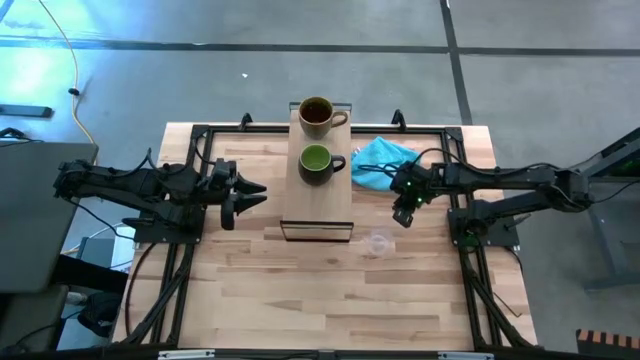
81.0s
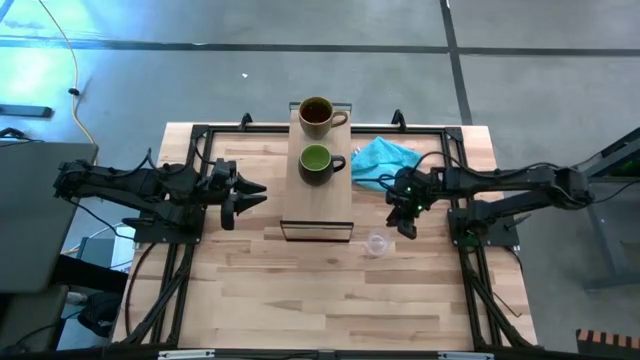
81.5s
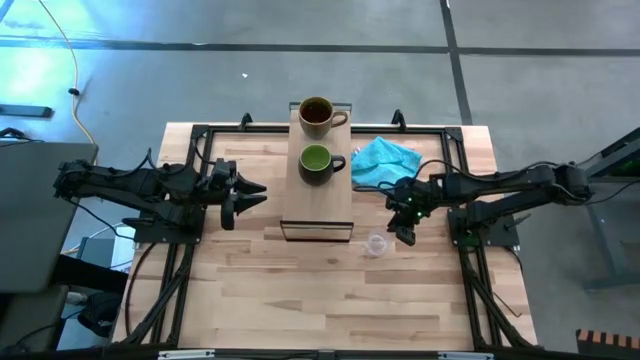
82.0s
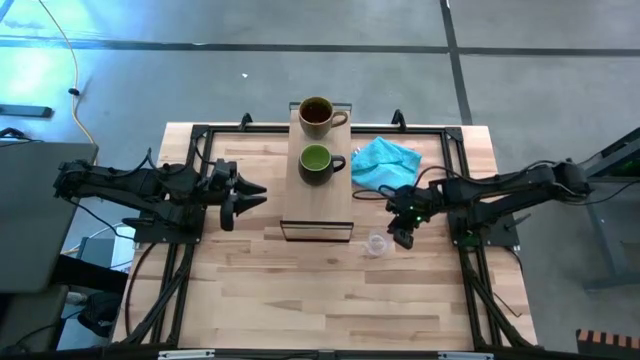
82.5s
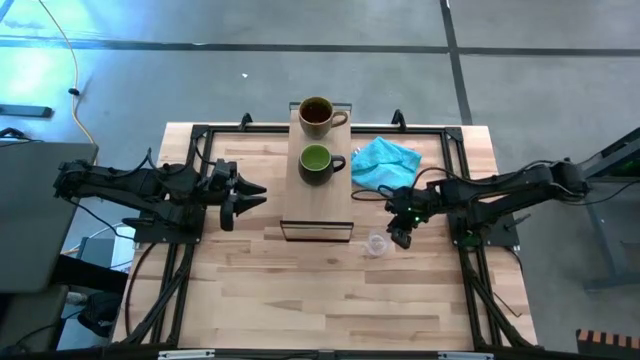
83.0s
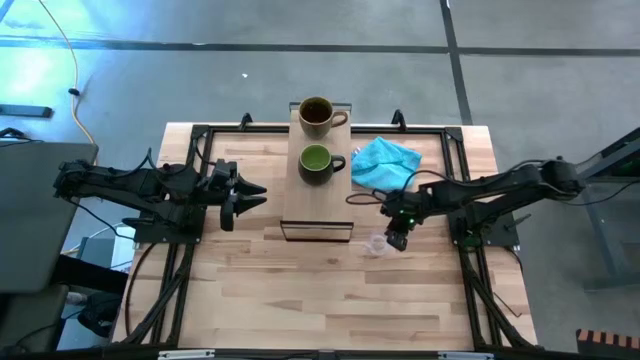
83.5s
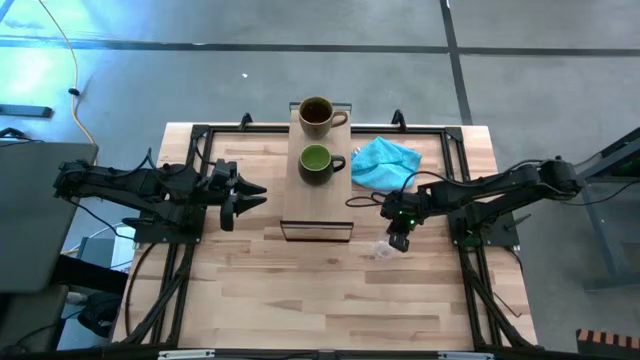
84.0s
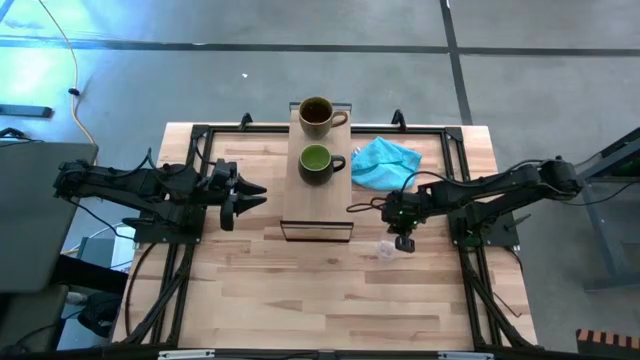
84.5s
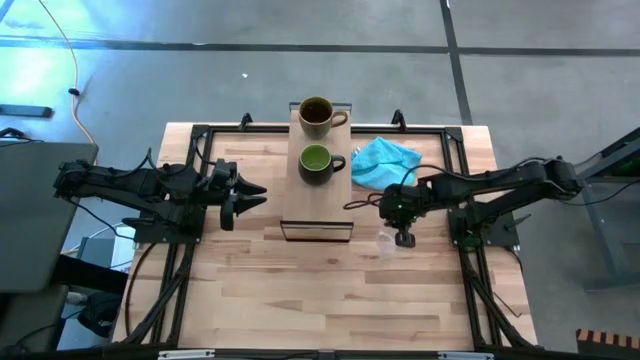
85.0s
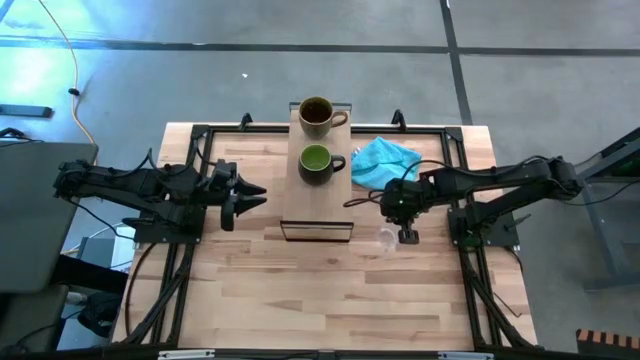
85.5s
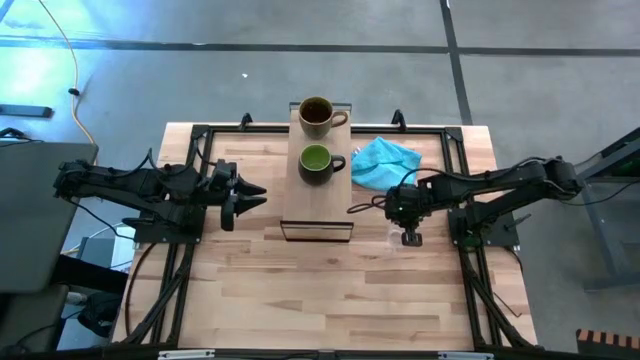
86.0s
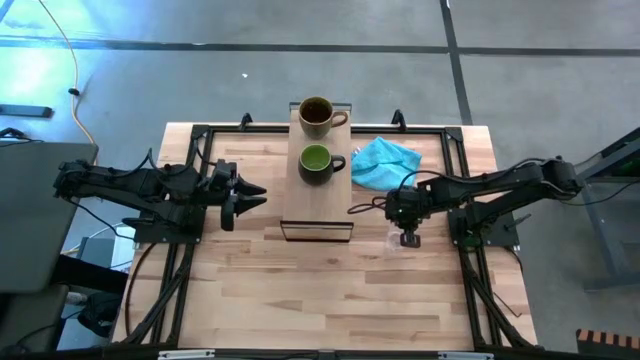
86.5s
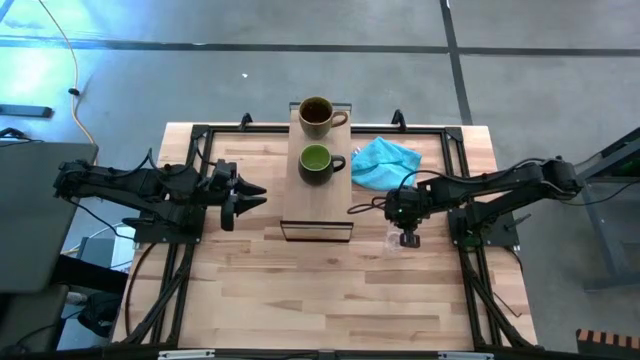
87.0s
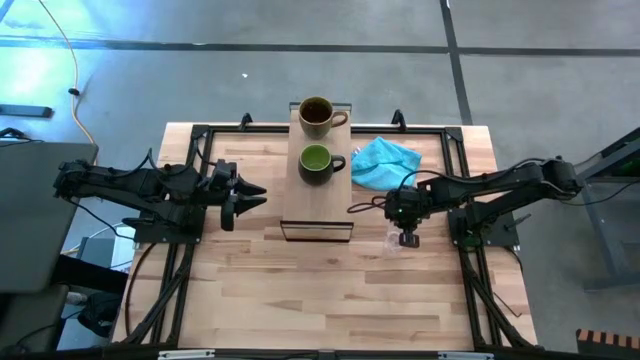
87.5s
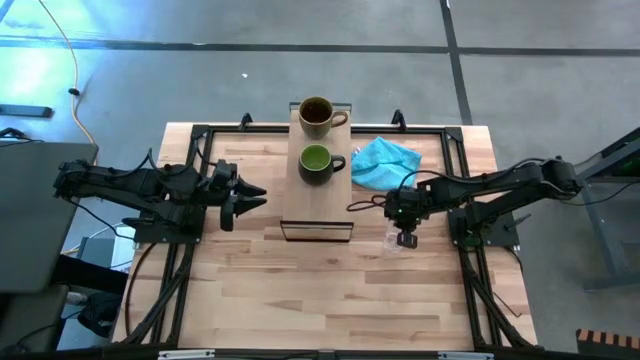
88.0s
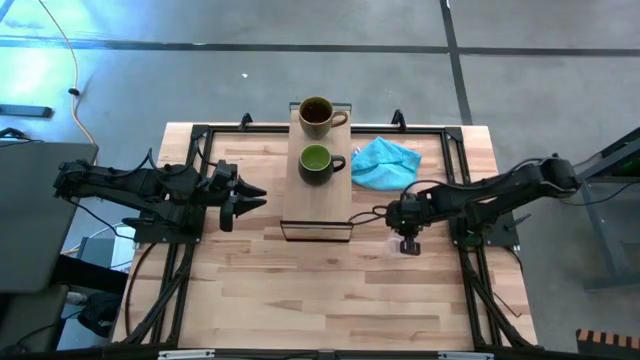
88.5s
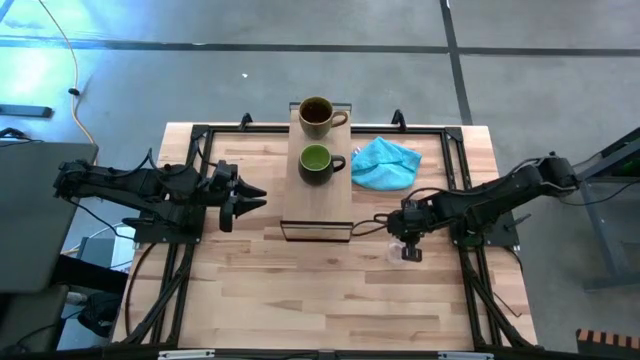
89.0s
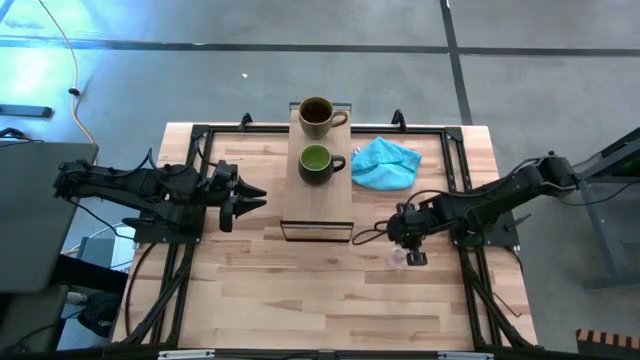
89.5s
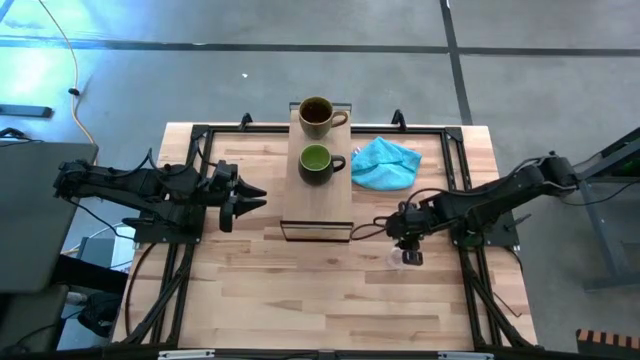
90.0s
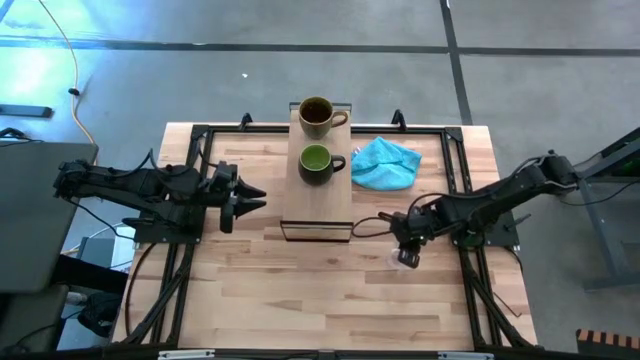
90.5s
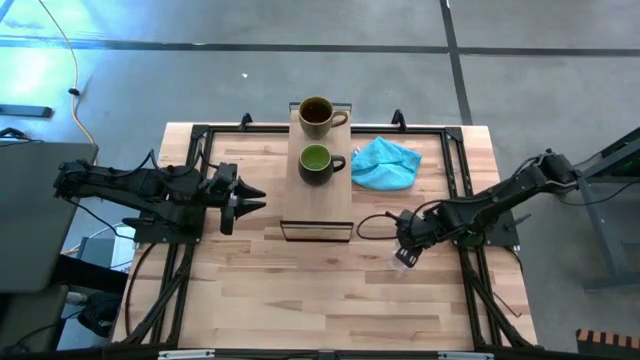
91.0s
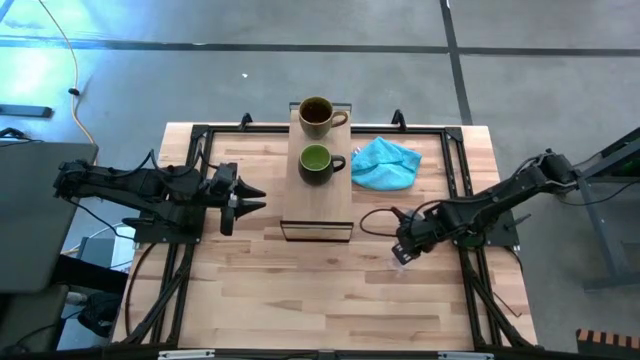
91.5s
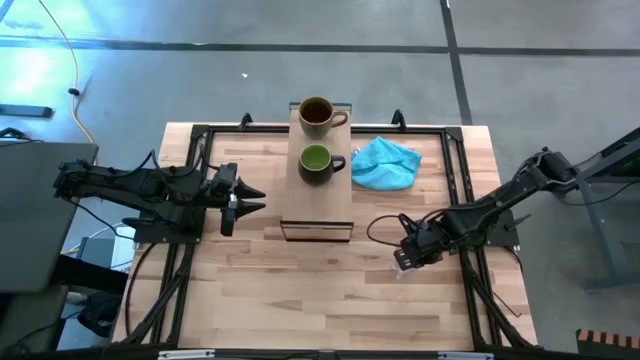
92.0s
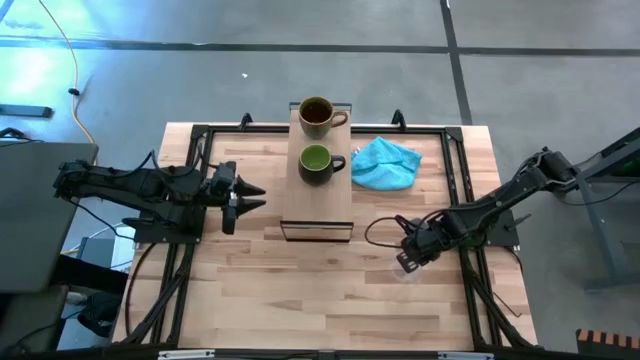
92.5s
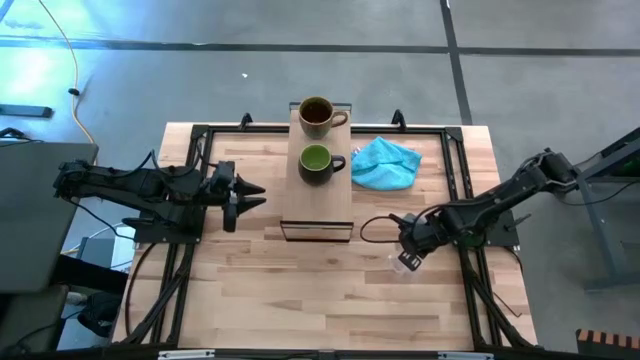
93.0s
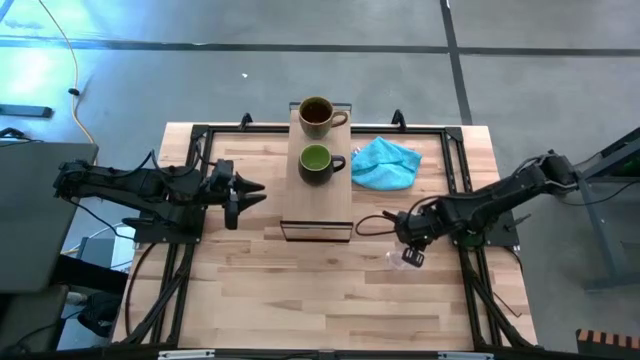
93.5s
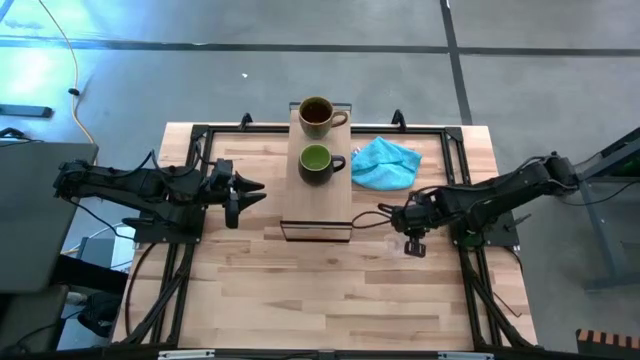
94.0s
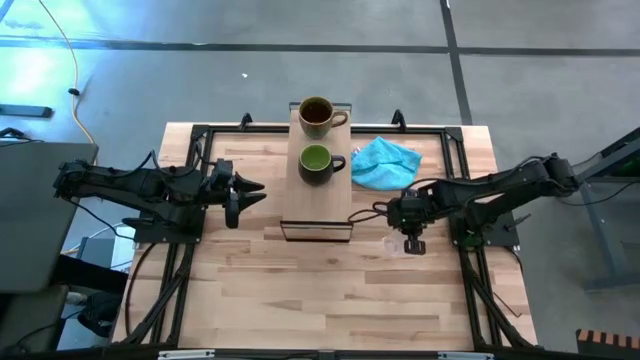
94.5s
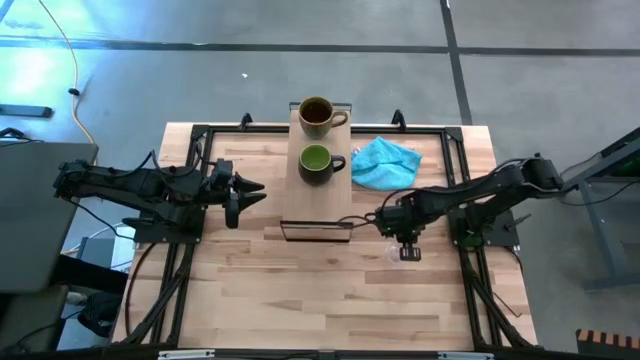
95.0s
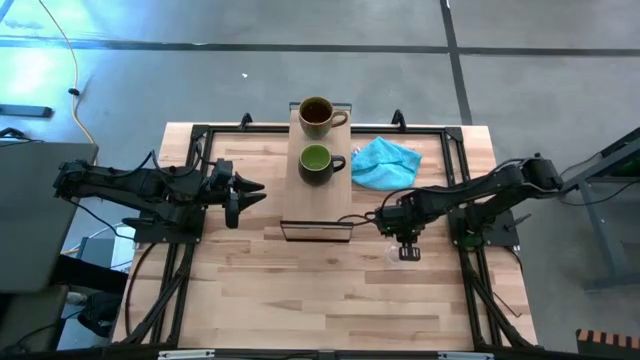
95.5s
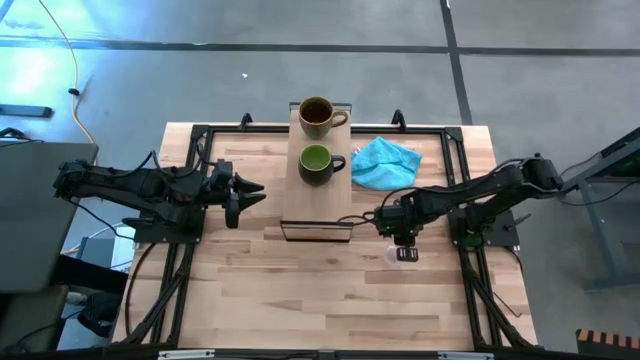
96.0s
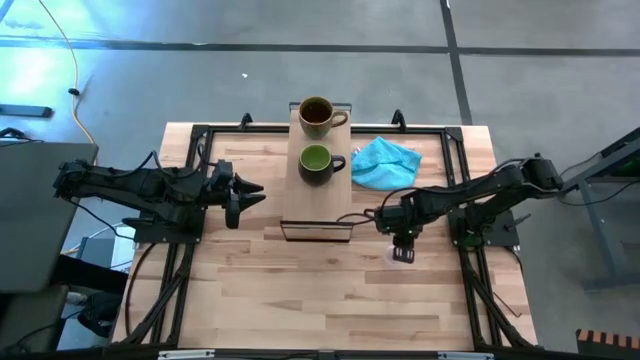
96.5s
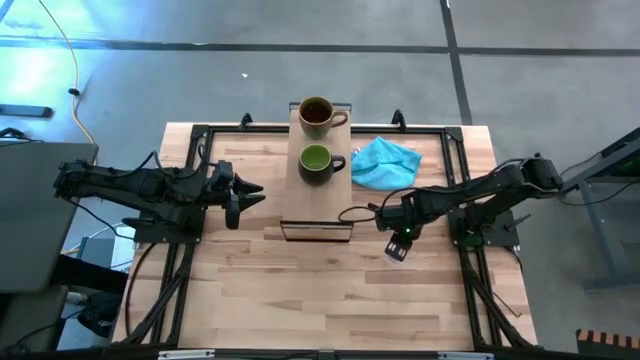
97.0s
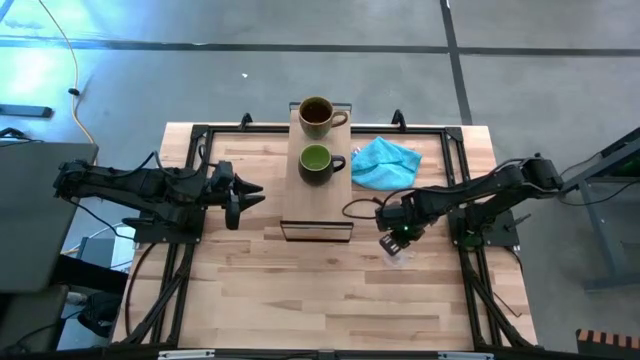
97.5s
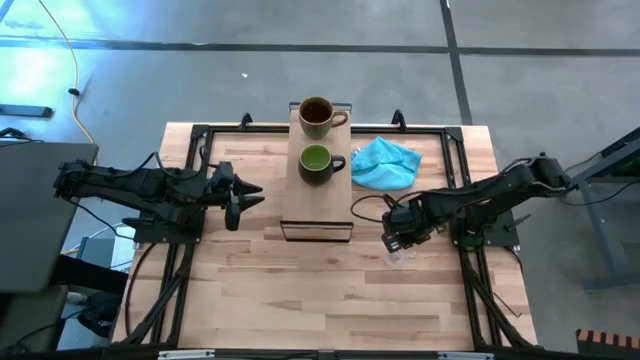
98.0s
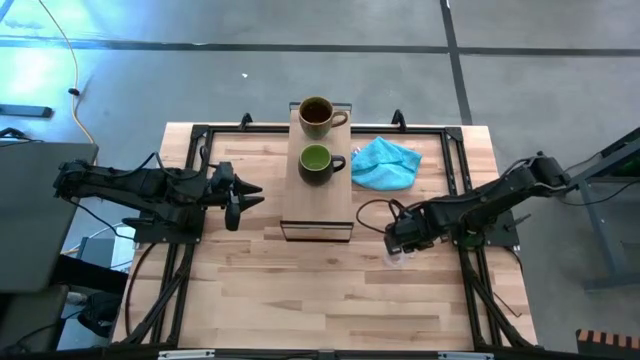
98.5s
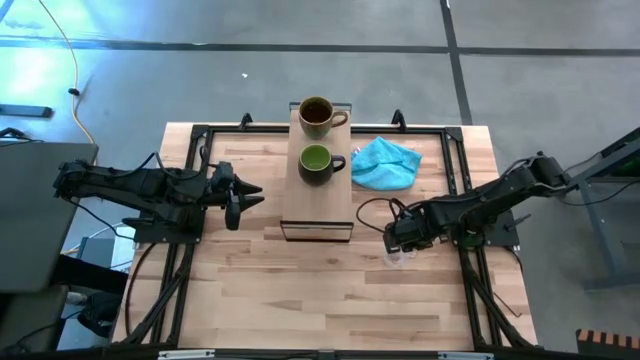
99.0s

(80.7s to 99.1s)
Task: Stack small to large cups/mugs on shelf
Put the transparent mug on the shelf

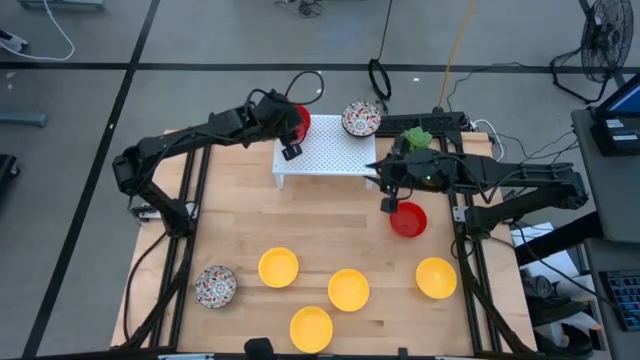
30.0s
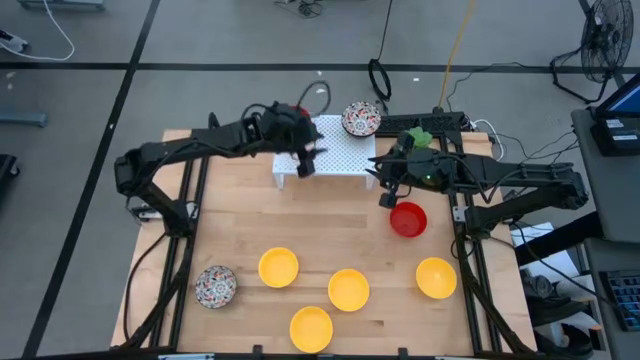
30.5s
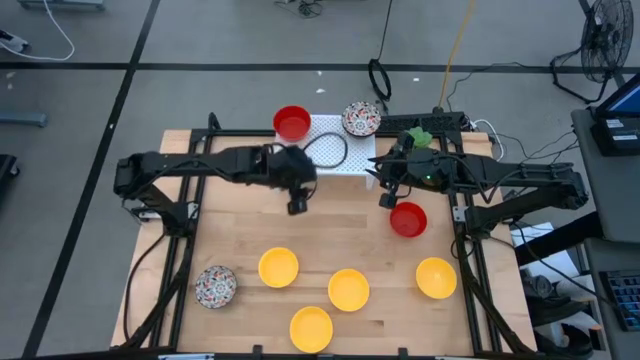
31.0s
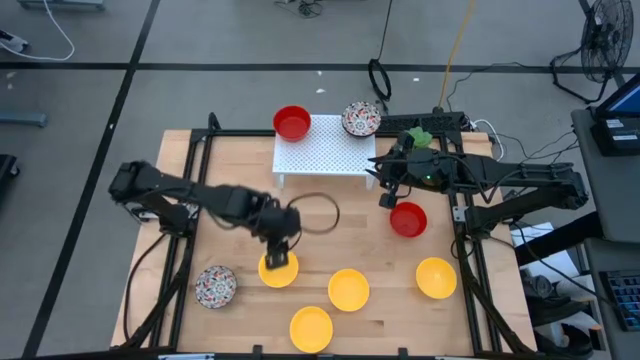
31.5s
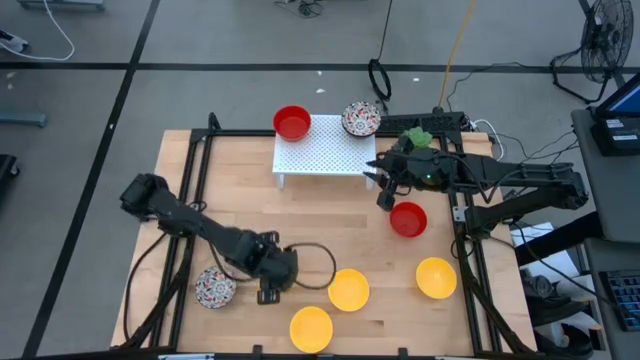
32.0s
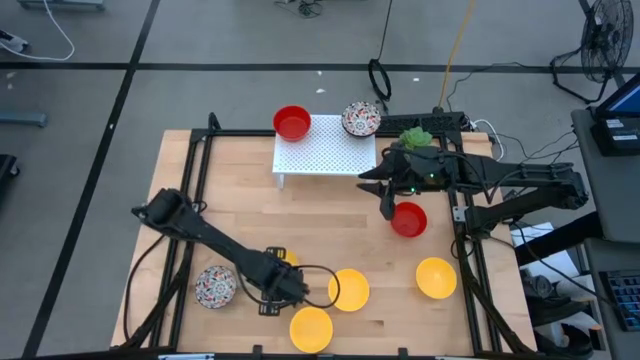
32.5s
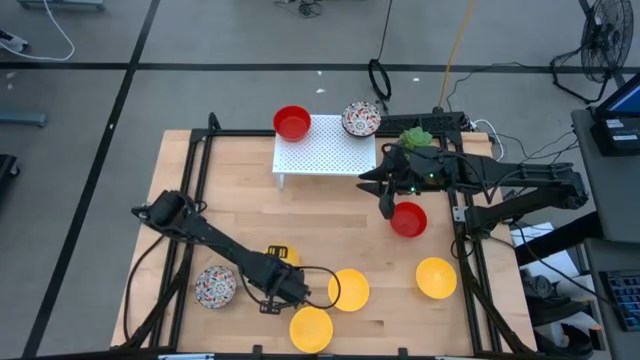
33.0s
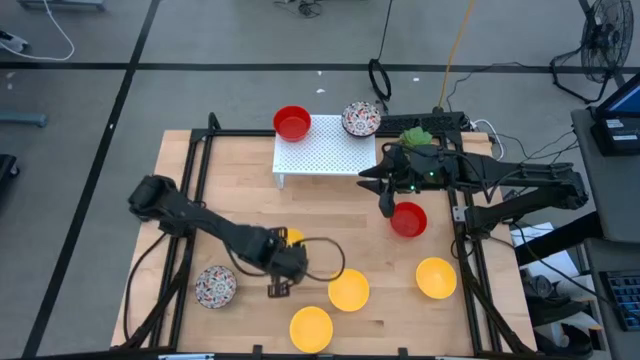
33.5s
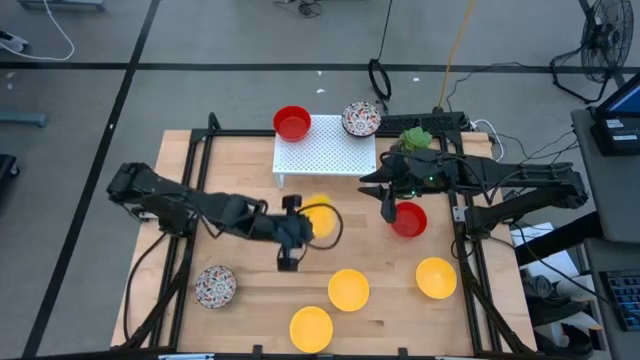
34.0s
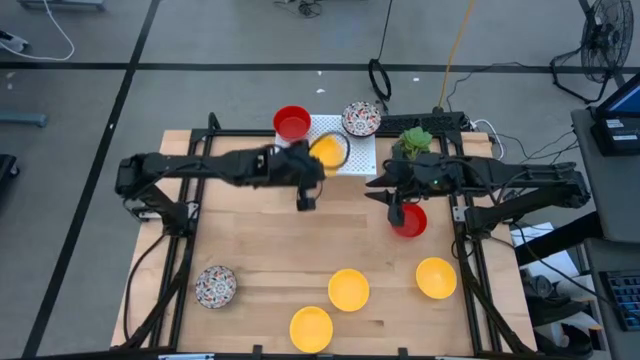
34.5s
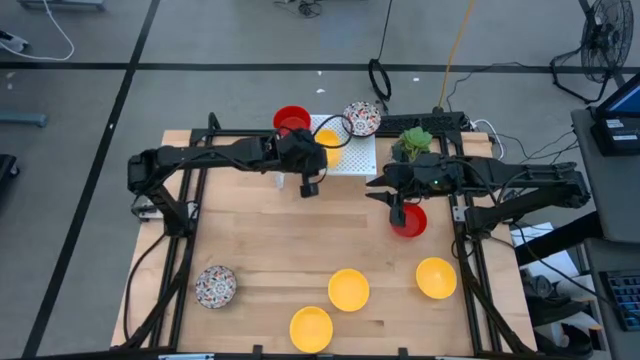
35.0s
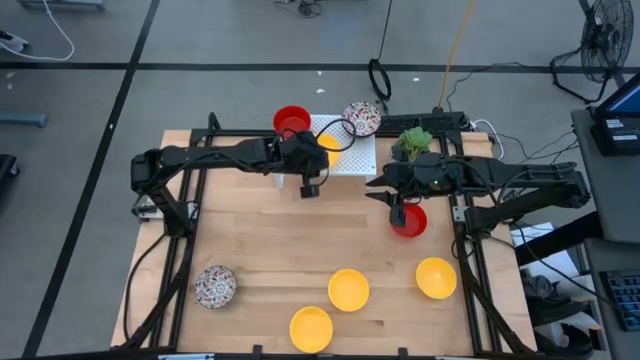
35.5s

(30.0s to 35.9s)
Task: Pick & Place Mini bowls
Put the yellow bowl on the shelf
